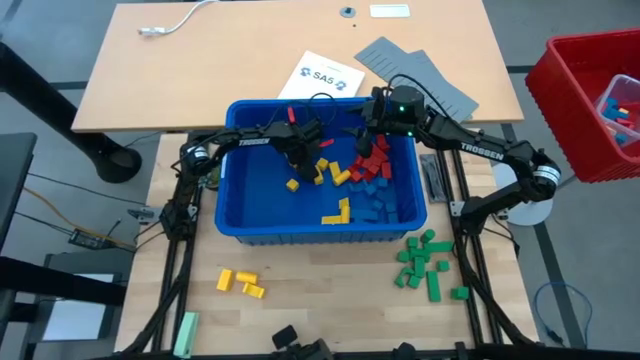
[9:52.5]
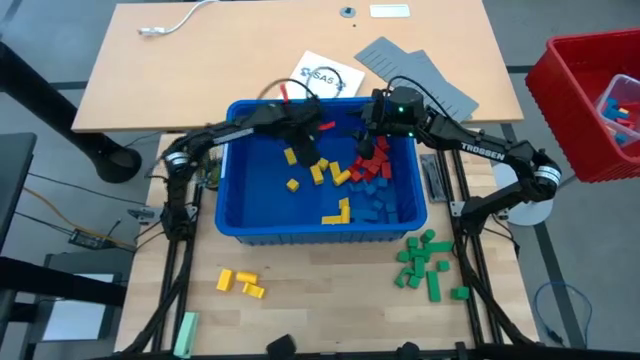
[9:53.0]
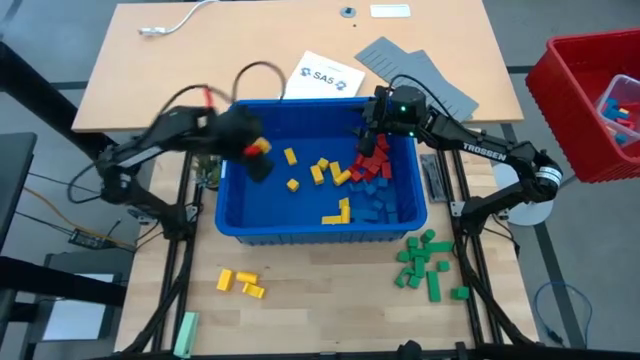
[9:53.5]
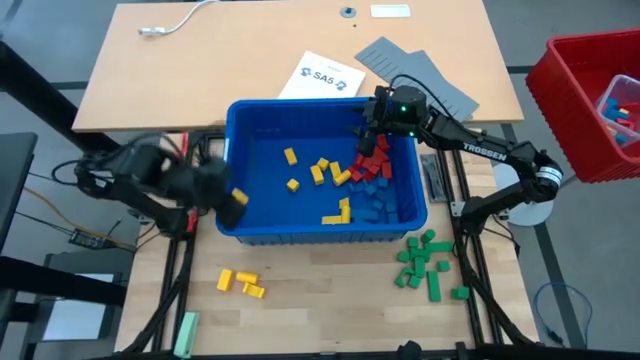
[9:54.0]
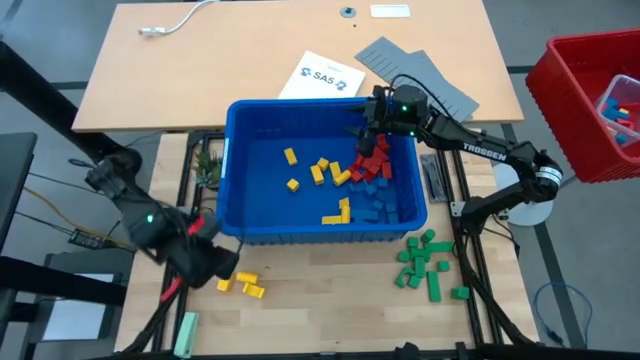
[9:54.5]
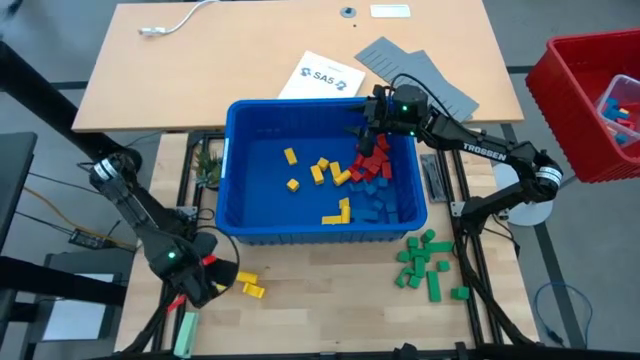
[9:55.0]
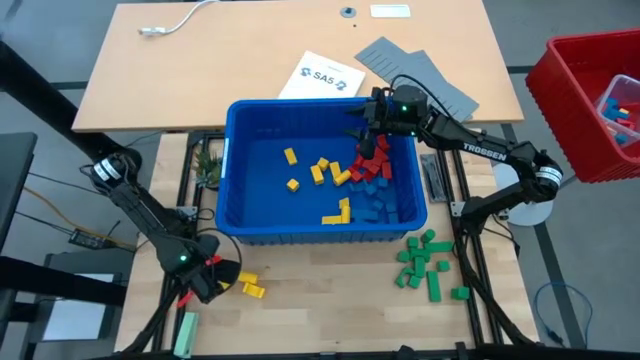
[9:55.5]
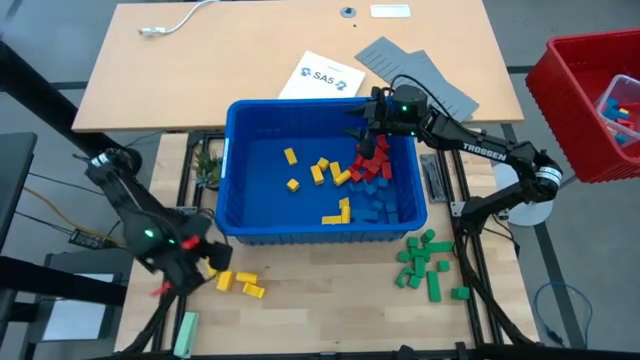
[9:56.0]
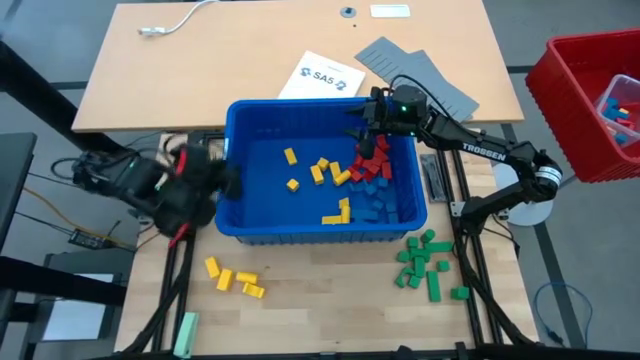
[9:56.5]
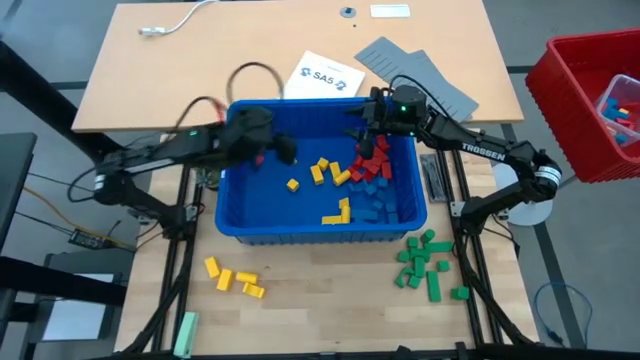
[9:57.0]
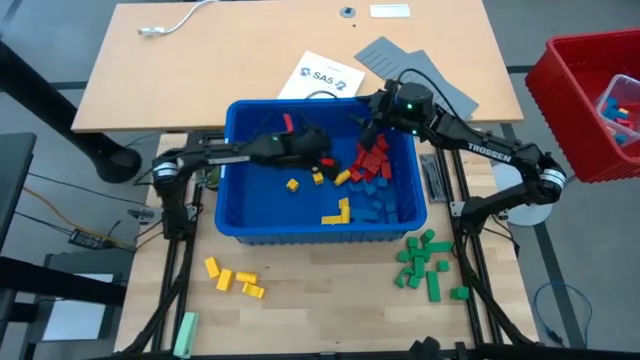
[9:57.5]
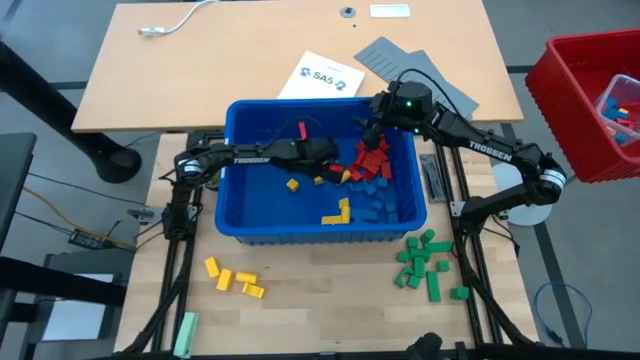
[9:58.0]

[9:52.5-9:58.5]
Task: Sort blocks
Remove the yellow block from the blue bin

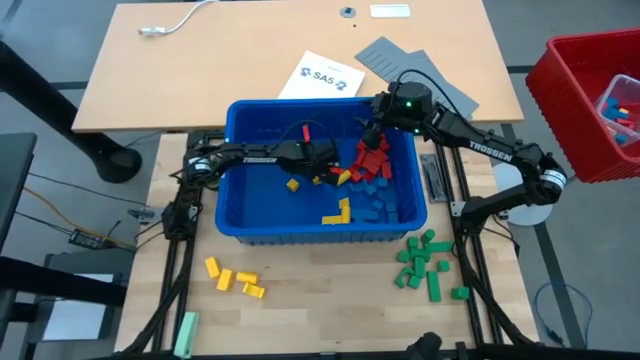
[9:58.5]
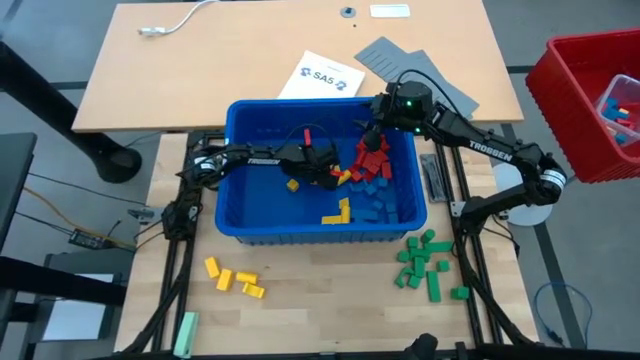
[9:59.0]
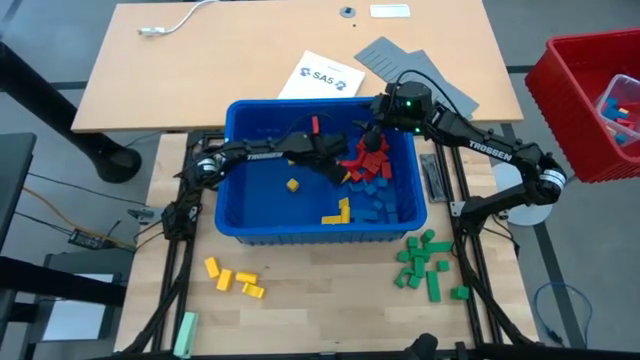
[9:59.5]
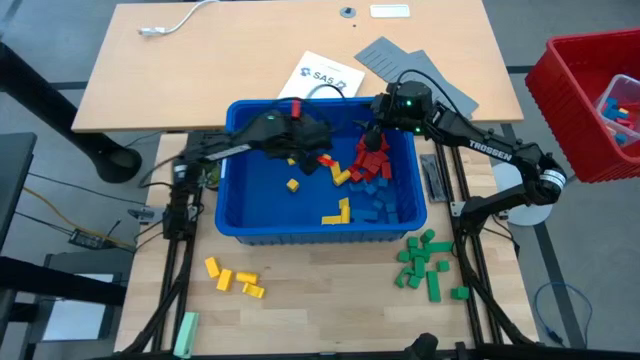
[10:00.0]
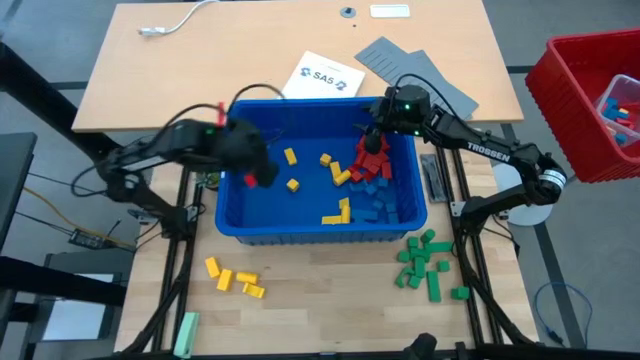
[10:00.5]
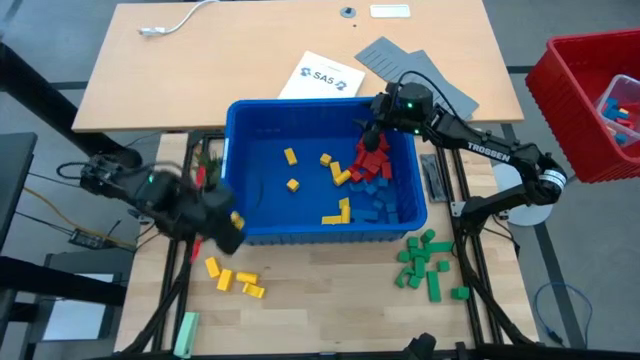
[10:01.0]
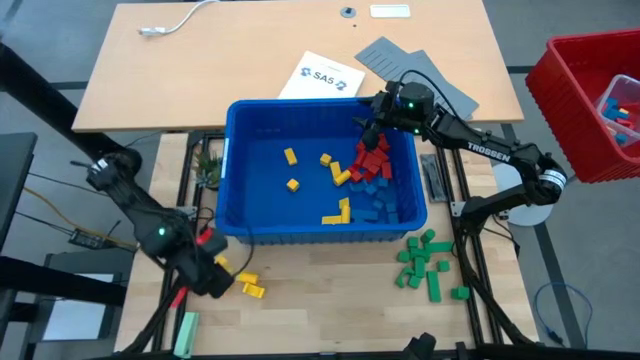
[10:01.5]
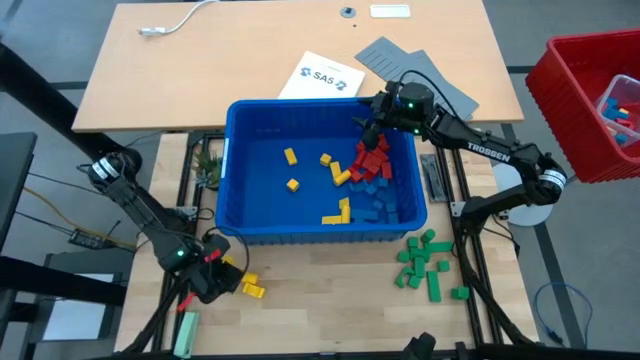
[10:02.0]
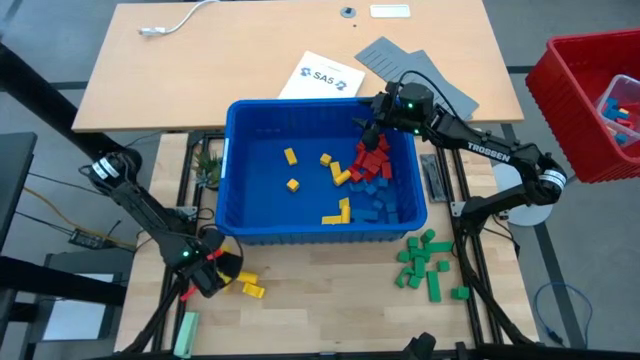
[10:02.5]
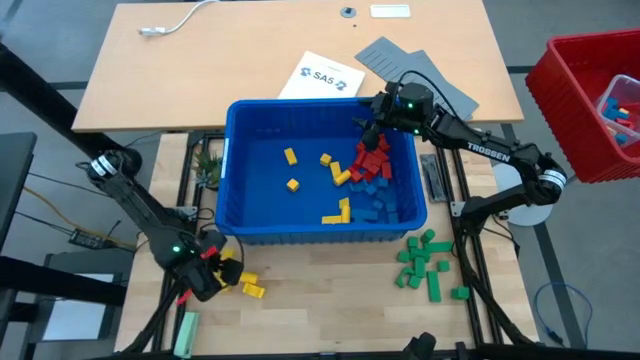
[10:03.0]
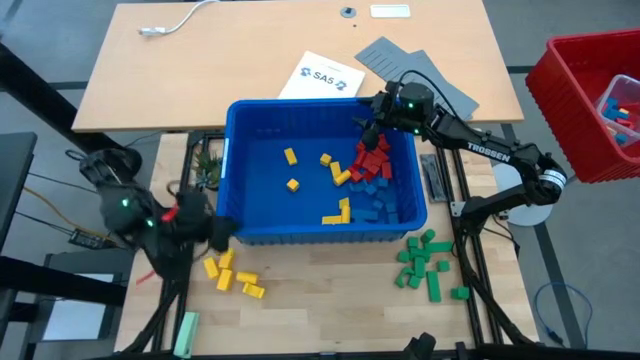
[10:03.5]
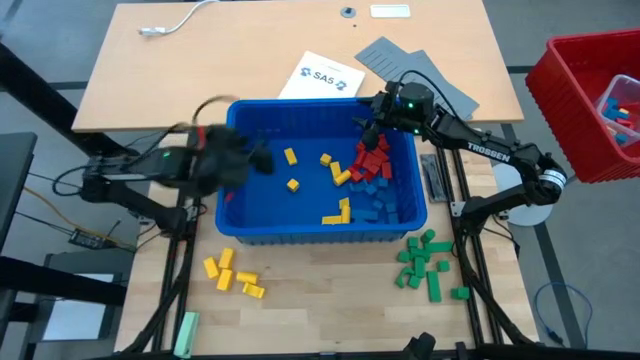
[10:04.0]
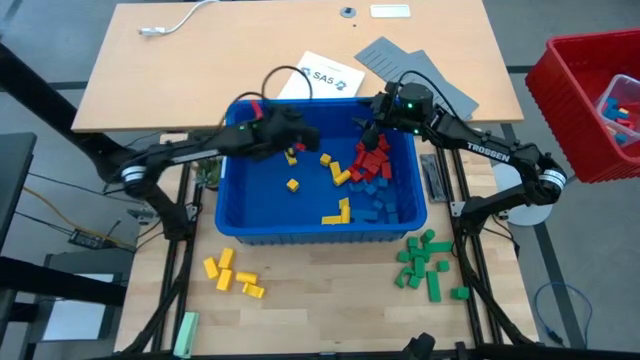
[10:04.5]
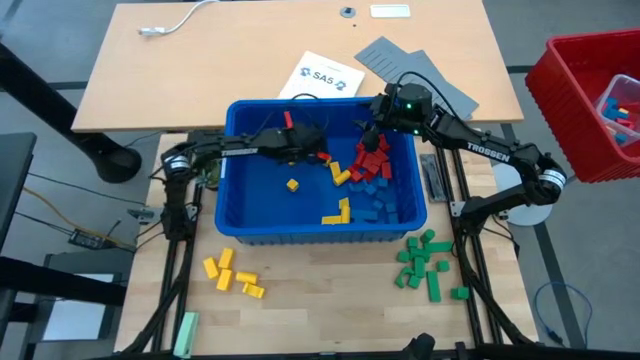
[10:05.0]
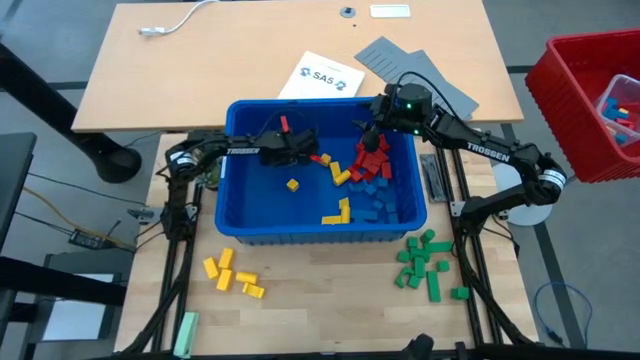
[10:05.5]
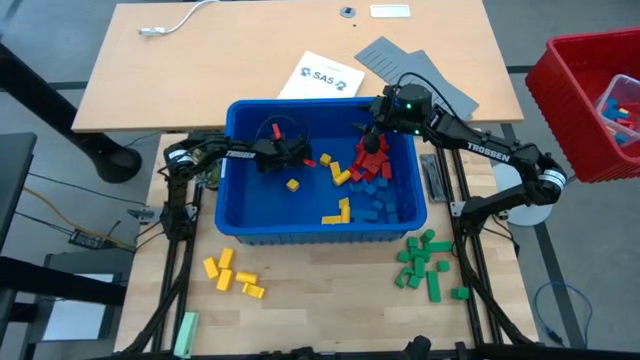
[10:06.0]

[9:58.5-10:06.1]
Remove the yellow block from the blue bin

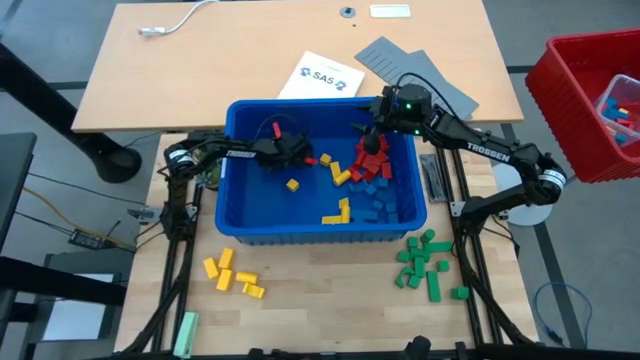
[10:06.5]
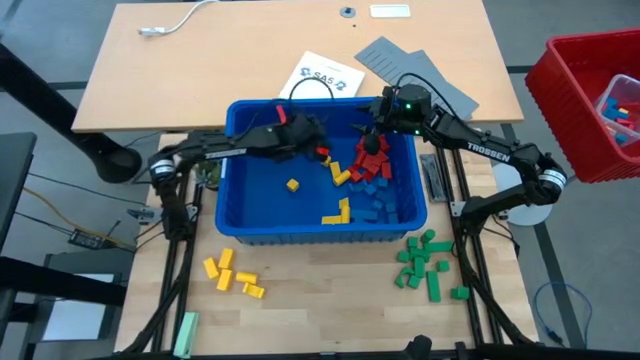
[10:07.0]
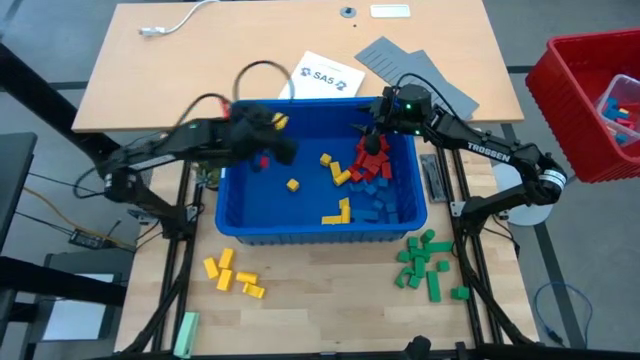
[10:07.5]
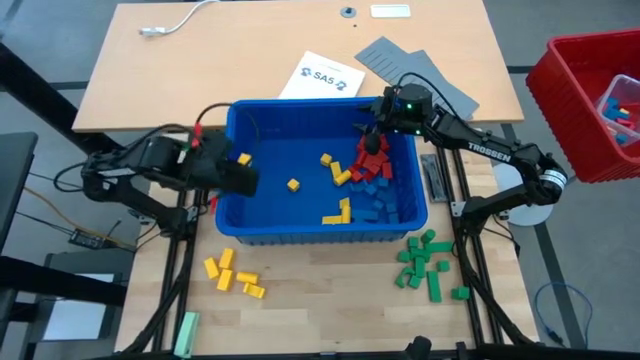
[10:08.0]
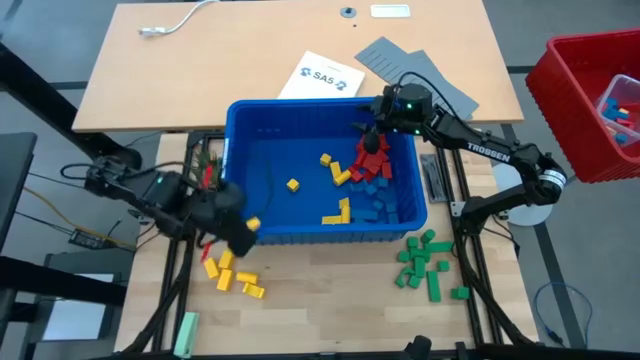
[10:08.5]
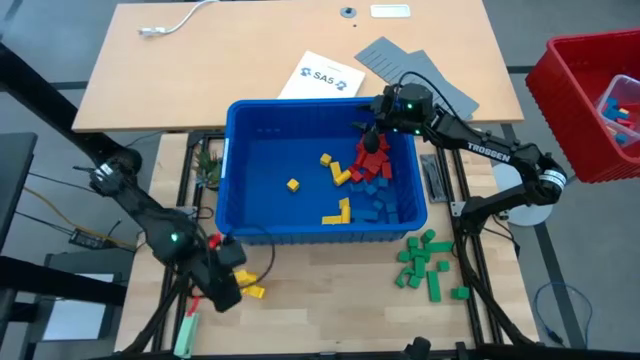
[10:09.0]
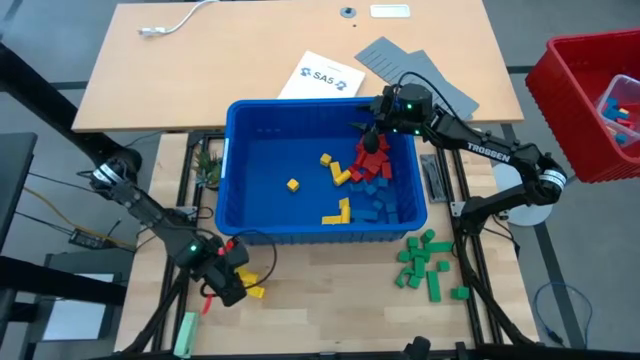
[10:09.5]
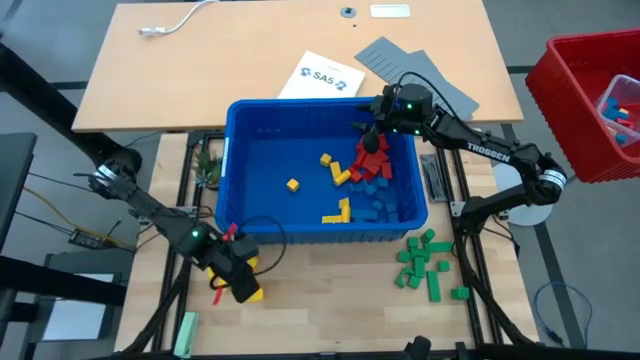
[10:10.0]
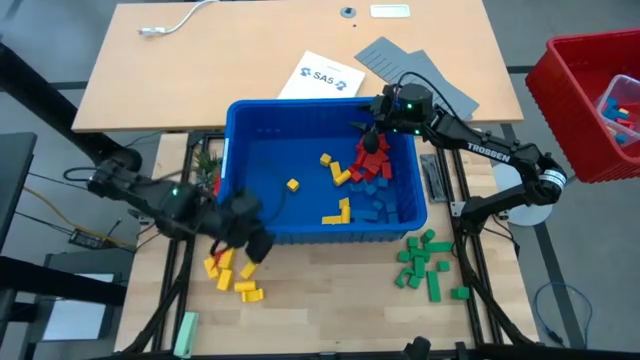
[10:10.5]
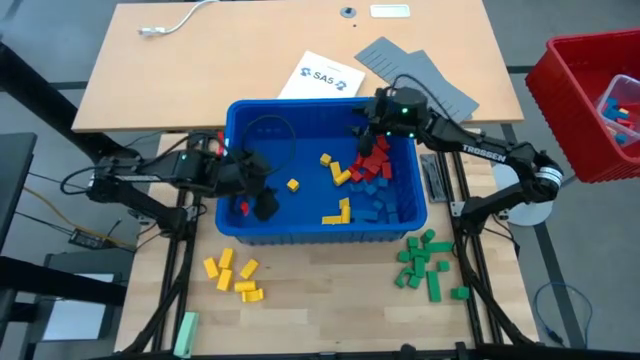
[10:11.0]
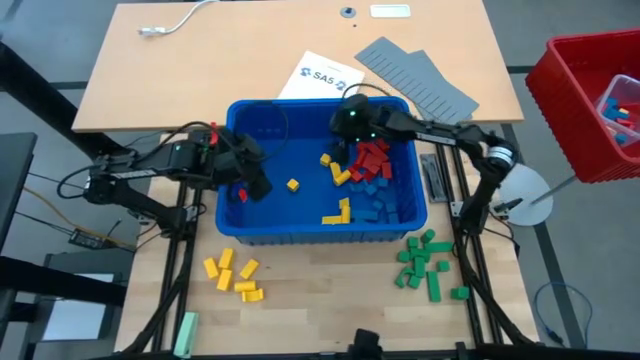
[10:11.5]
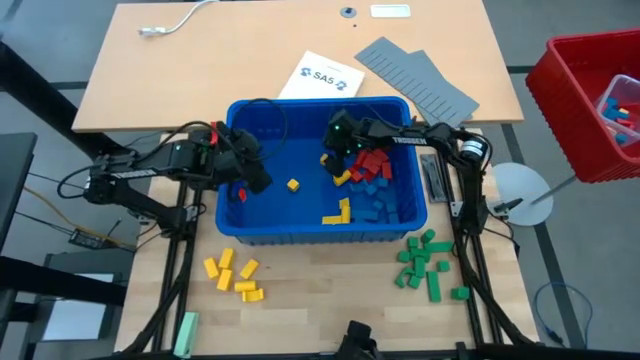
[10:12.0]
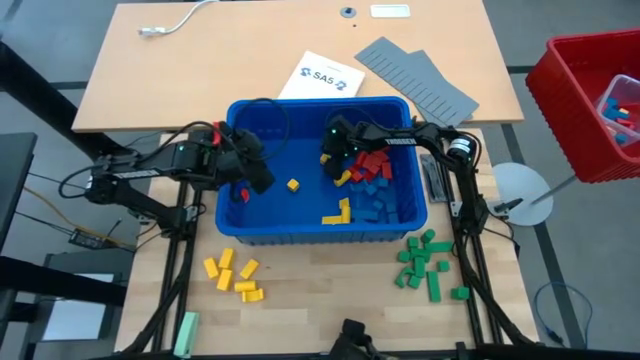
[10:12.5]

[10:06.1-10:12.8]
Remove the yellow block from the blue bin
